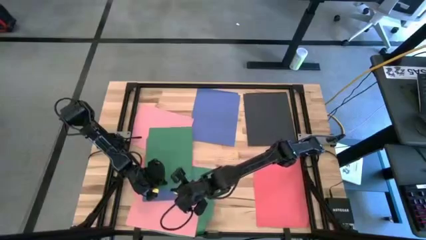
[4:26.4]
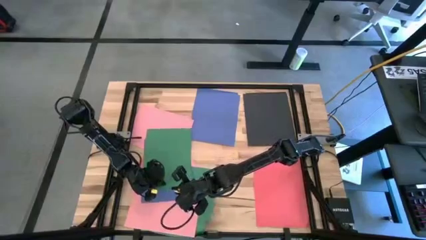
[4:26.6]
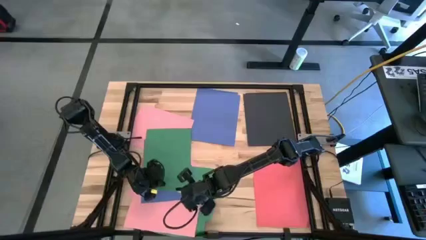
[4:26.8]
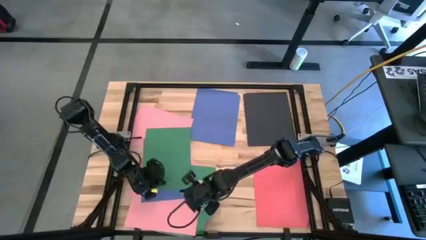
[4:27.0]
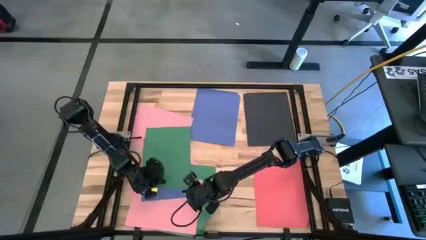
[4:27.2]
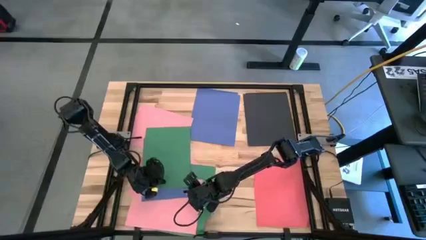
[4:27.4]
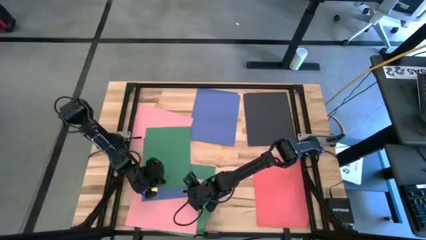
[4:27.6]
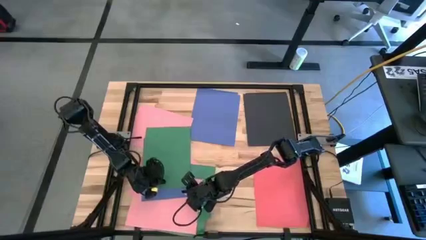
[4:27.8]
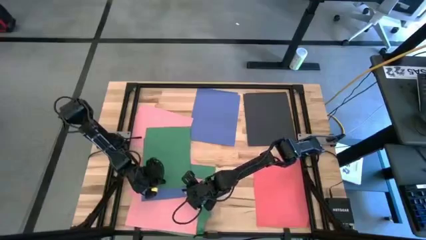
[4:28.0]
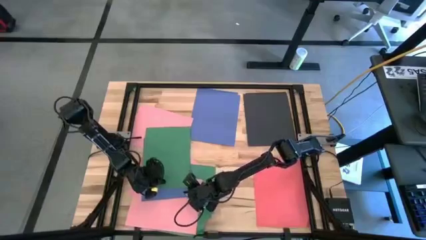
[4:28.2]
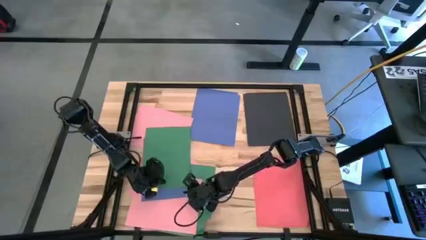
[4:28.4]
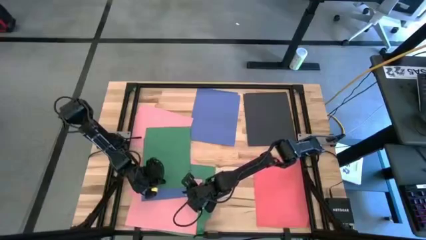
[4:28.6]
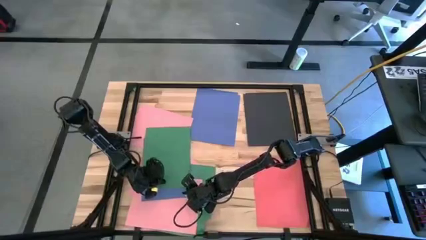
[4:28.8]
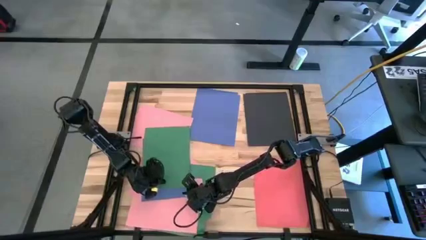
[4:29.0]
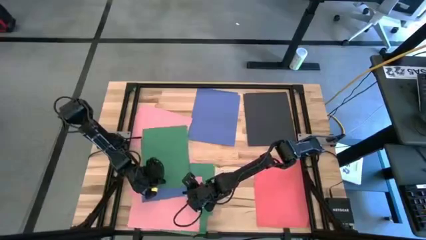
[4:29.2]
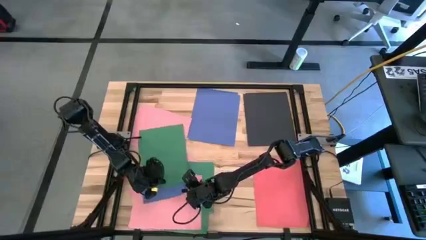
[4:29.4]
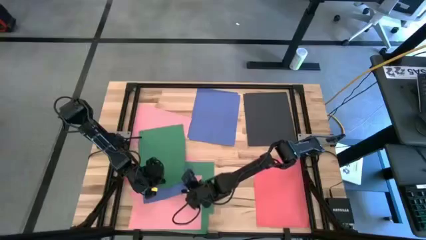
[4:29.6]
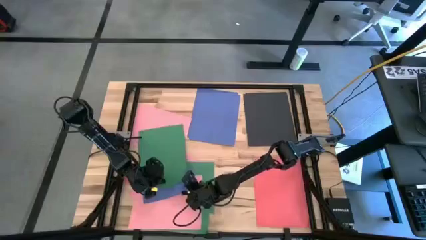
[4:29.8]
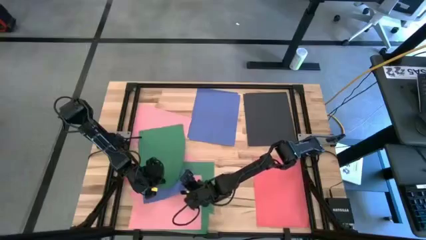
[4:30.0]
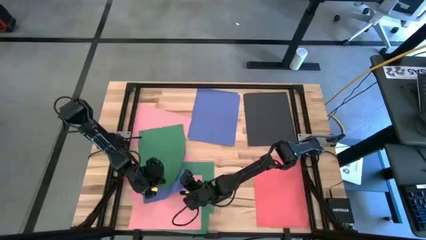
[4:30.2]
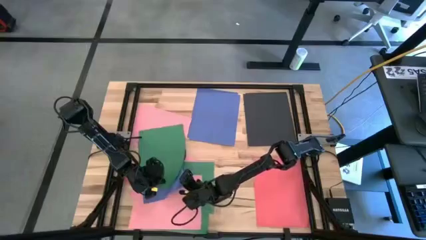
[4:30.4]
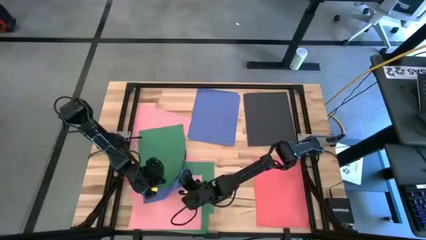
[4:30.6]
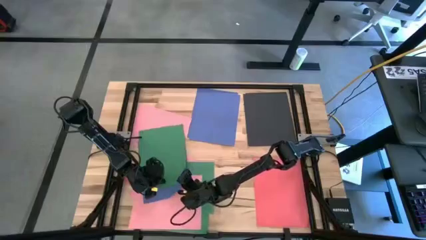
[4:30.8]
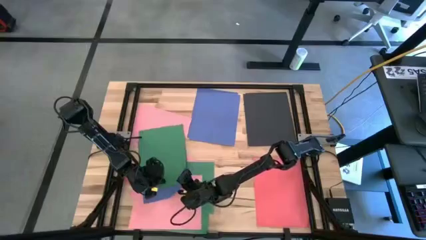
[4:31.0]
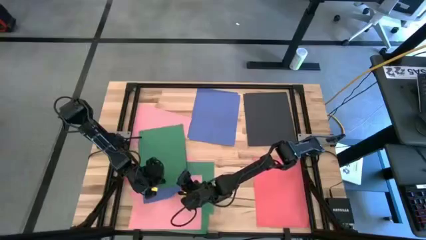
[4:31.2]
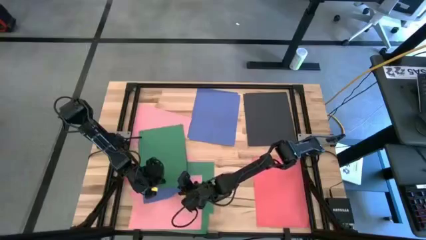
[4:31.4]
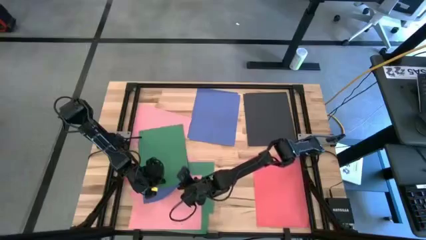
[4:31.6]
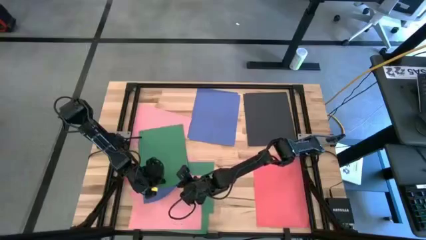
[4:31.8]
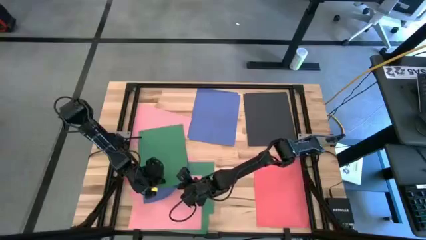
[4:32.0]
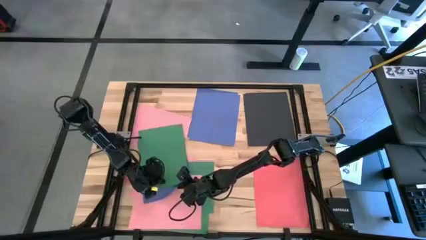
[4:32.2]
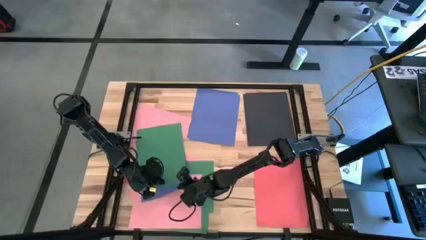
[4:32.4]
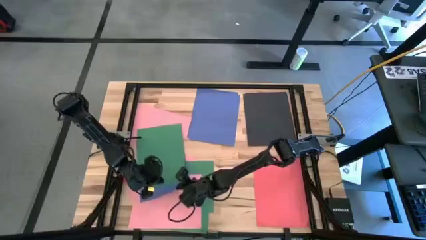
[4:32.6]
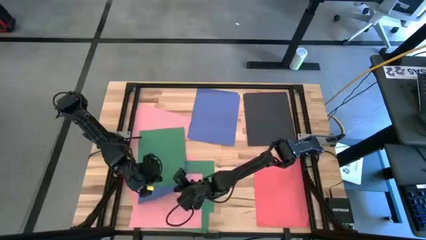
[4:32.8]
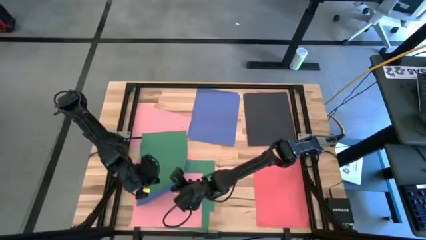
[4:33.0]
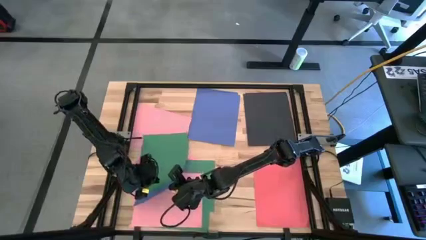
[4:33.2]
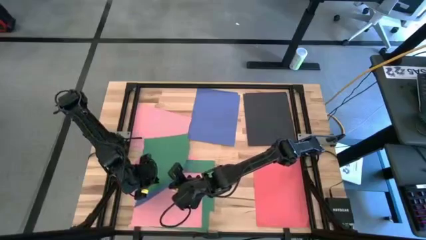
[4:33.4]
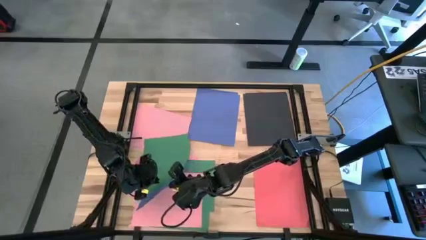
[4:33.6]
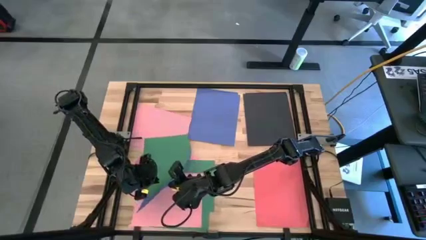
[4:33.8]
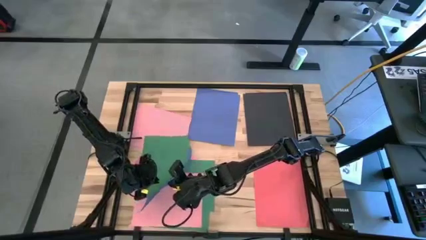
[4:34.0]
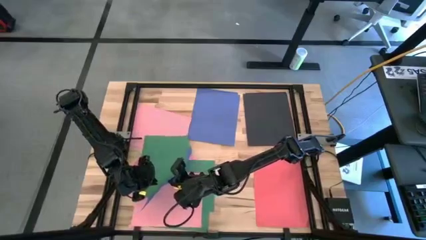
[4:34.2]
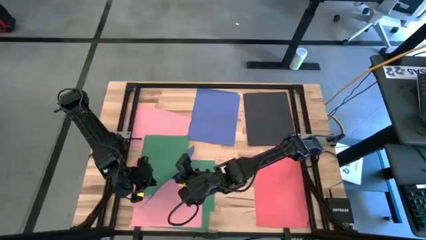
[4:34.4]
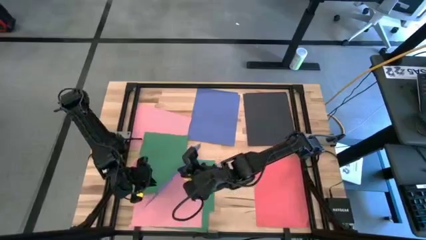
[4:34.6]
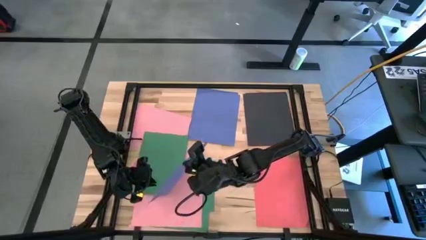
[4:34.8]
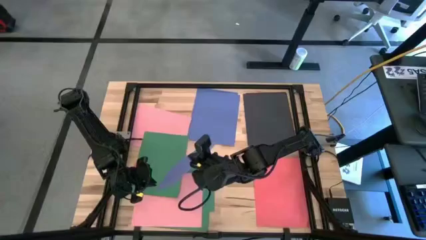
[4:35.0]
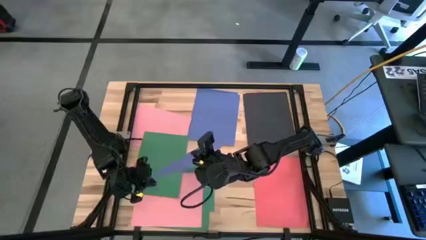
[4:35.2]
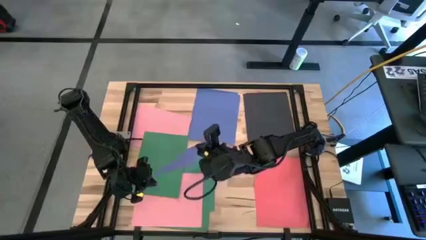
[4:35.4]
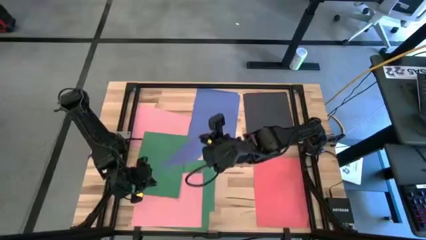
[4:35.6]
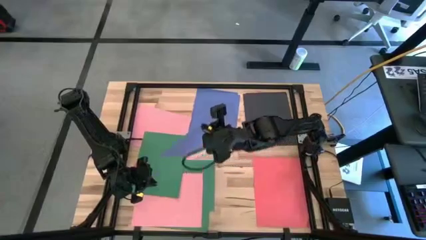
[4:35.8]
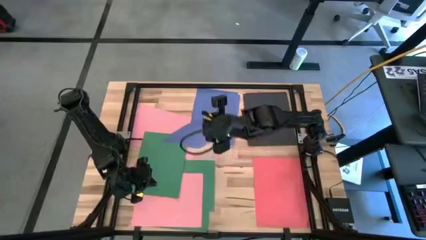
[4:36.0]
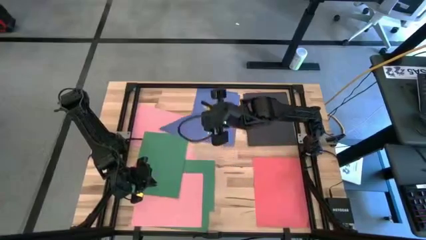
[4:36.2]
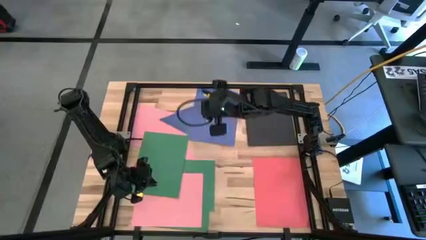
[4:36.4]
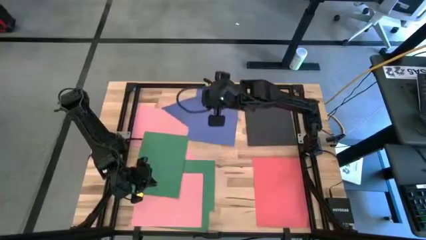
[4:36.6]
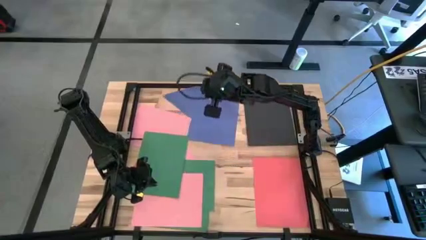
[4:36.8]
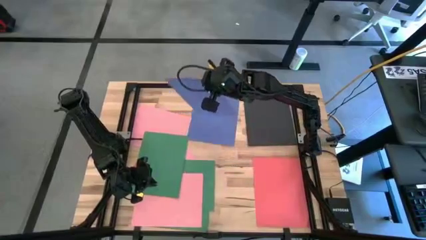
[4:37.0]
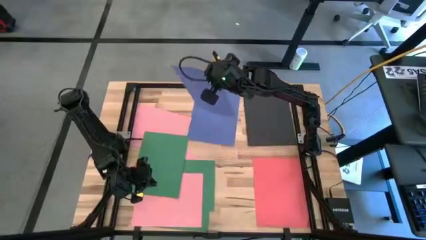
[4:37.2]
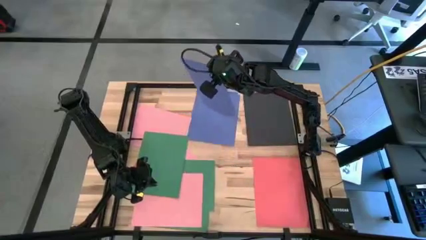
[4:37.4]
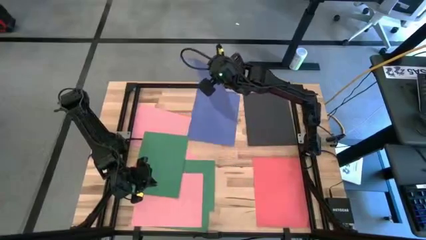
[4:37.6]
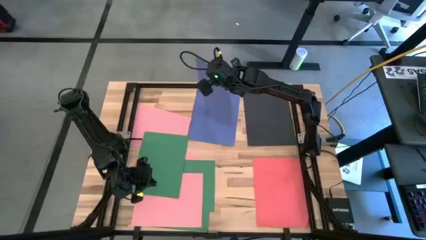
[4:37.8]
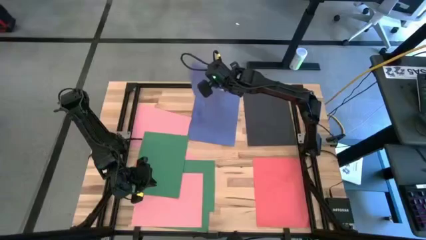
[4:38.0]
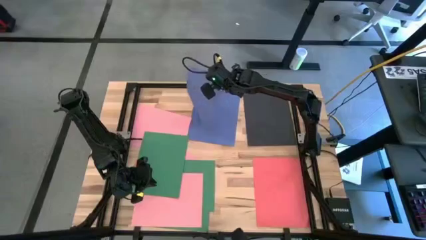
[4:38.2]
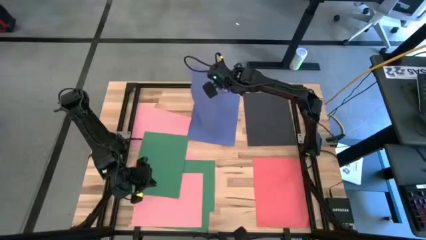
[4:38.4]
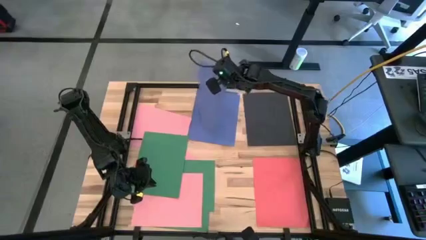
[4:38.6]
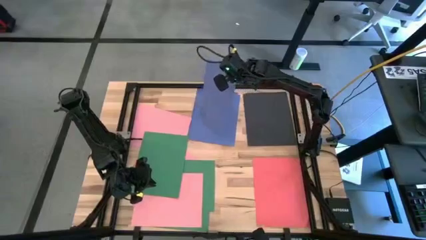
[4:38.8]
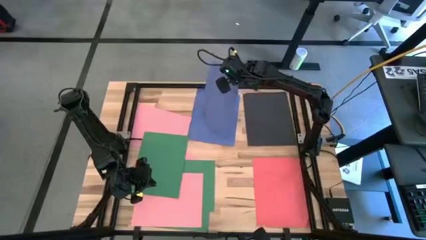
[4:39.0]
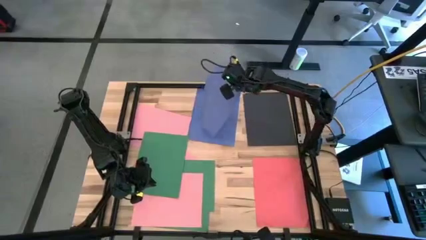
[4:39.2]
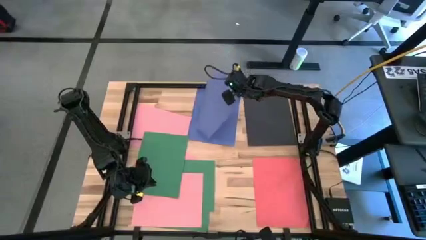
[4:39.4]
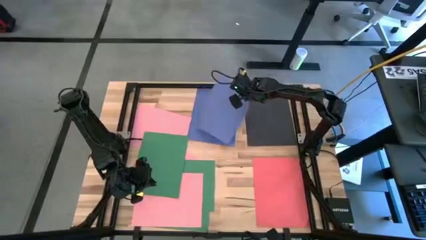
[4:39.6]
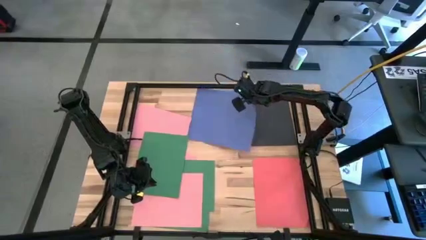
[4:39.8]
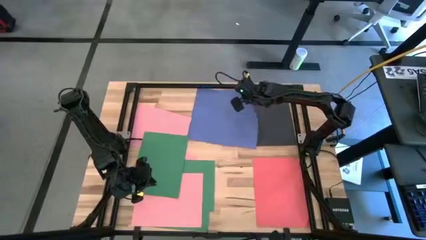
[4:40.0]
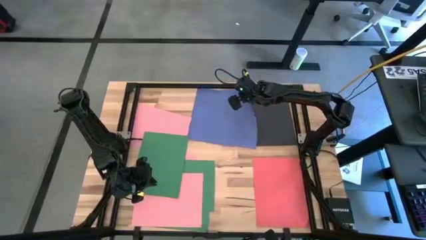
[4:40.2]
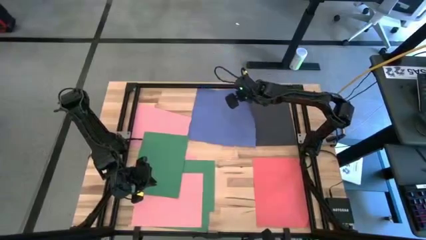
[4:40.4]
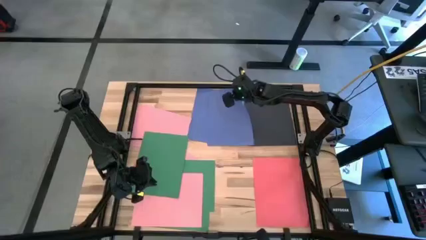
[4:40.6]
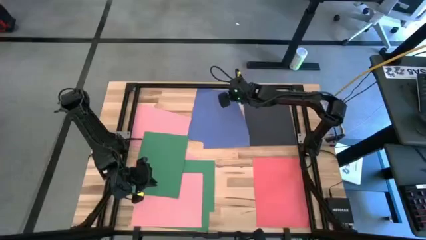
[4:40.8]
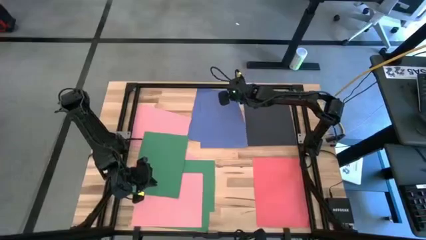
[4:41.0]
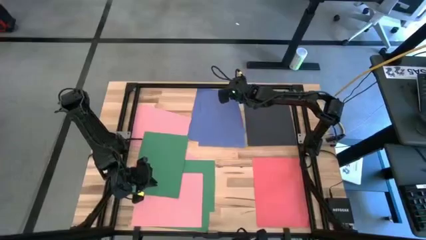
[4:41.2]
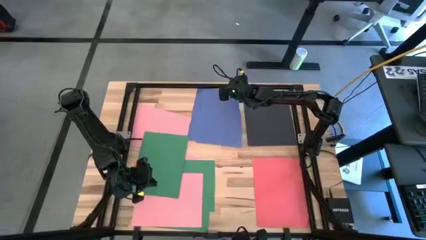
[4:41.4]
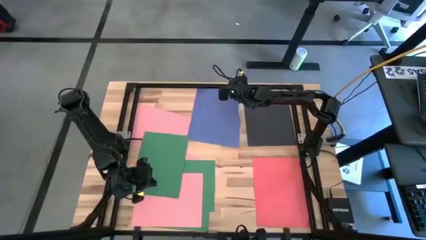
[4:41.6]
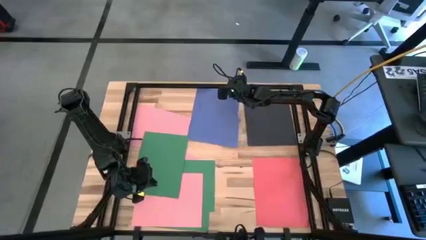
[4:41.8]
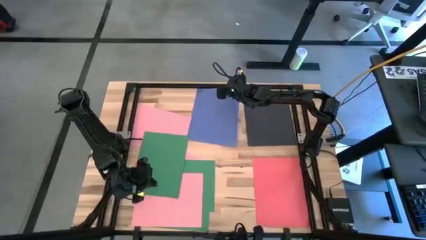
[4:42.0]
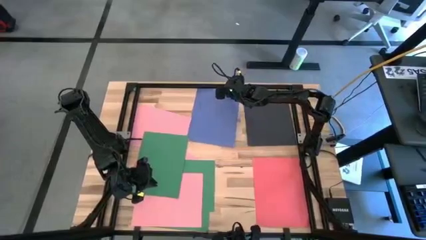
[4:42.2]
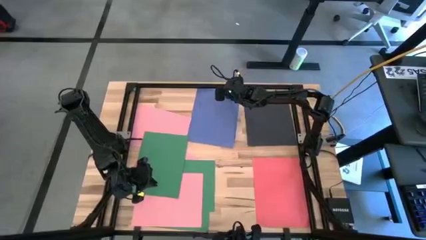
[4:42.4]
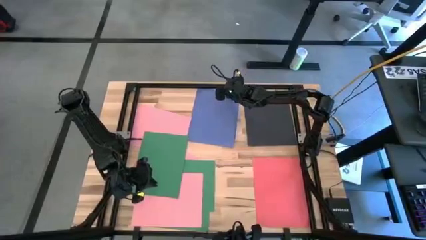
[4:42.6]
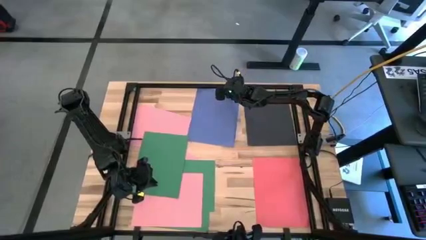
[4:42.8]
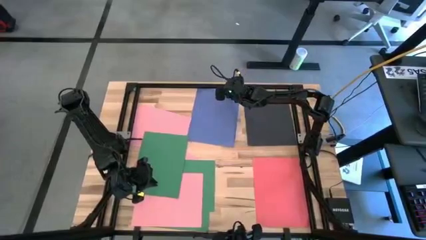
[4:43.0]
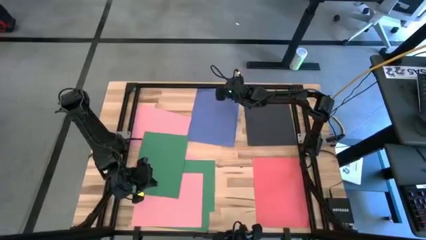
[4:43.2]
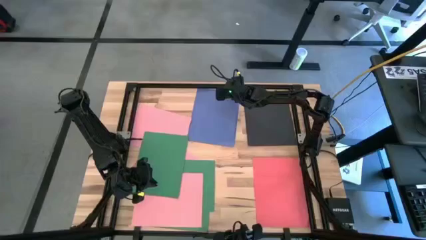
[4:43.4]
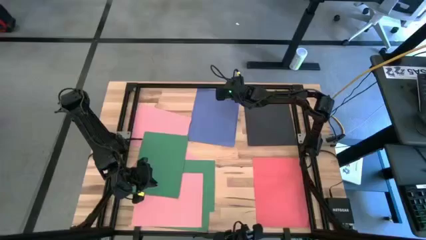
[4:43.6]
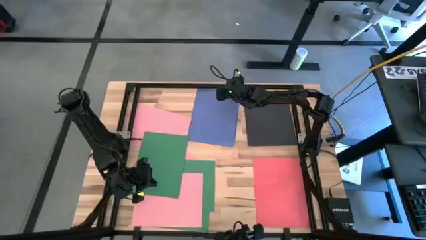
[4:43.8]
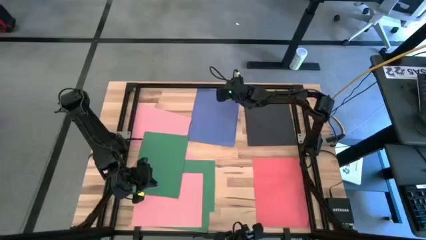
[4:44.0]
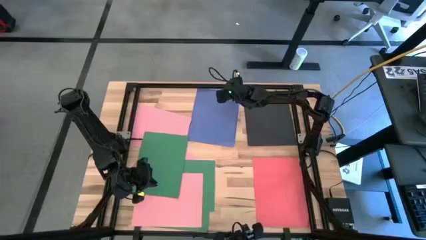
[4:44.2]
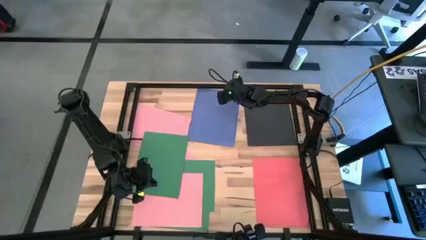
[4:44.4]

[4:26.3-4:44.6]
Task: Organize paper
Stack the blue paper on top of the other blue papers on the table
